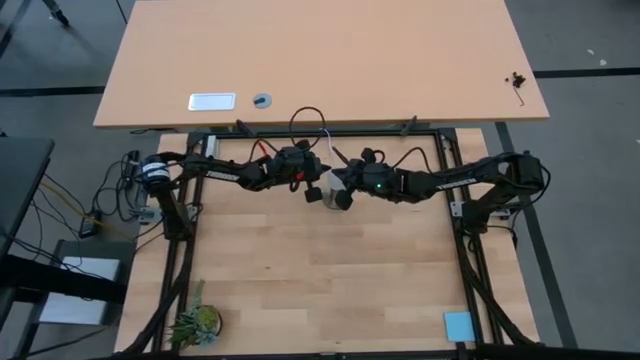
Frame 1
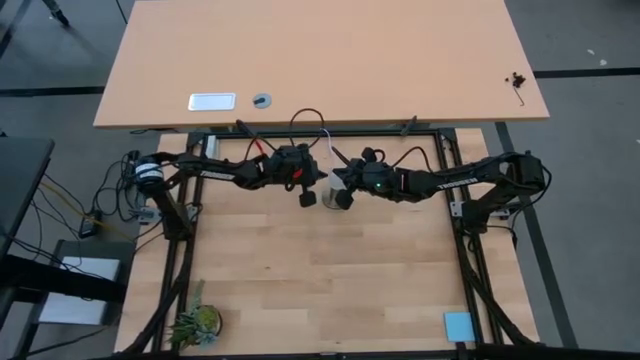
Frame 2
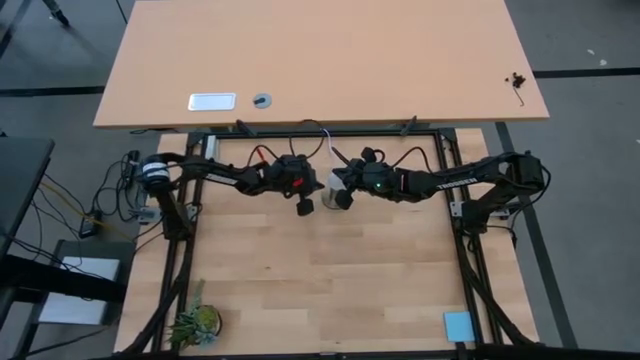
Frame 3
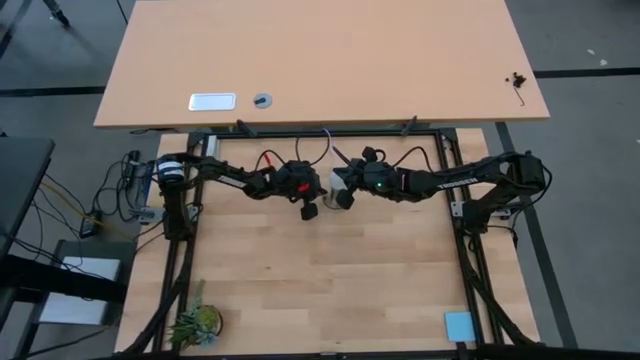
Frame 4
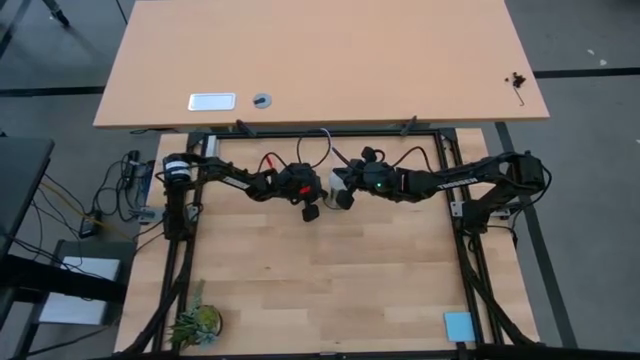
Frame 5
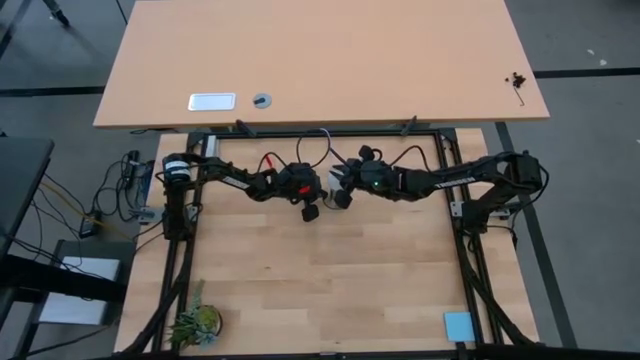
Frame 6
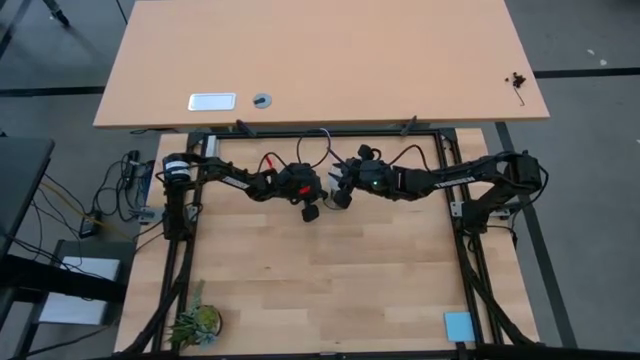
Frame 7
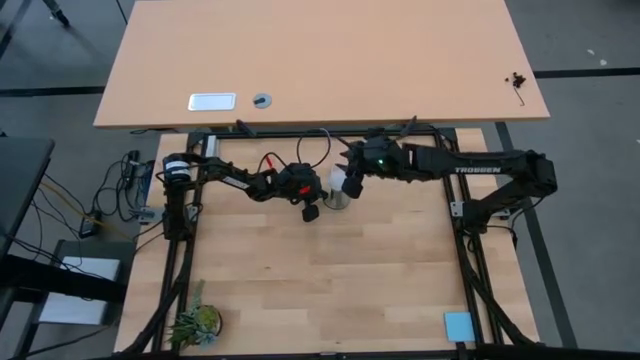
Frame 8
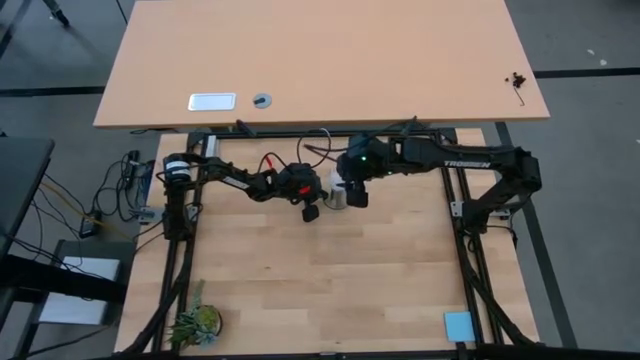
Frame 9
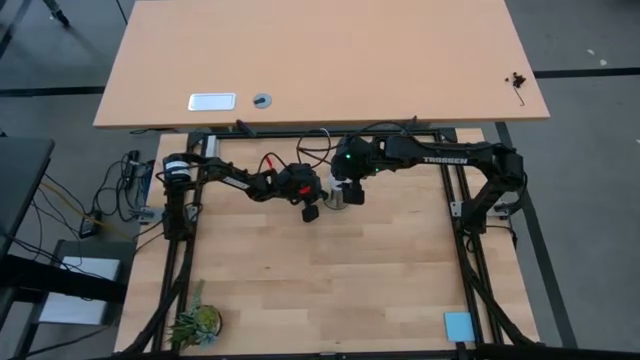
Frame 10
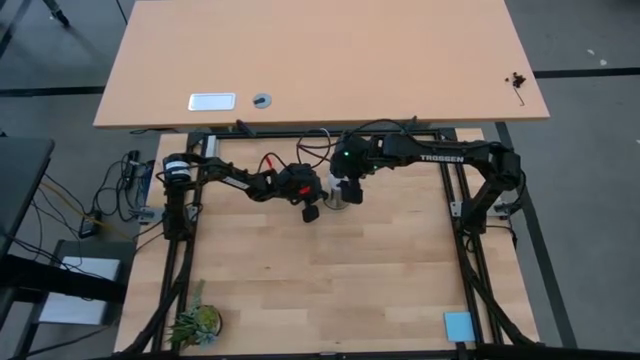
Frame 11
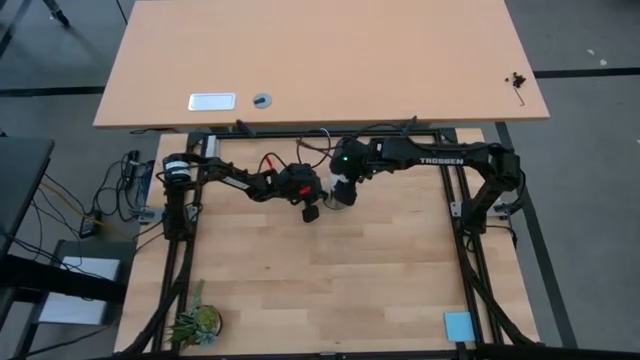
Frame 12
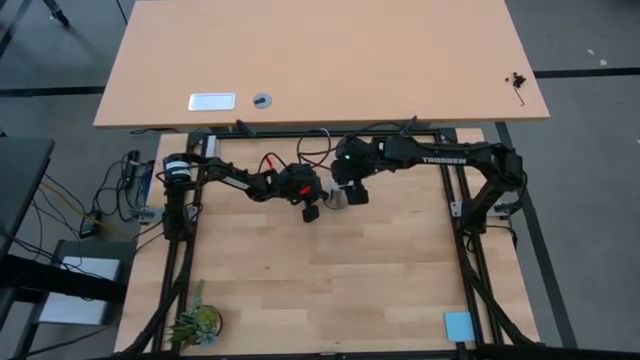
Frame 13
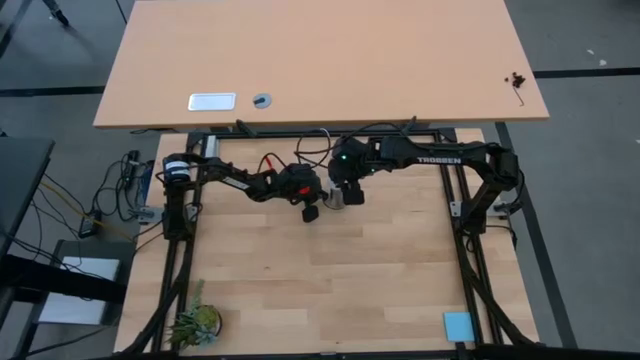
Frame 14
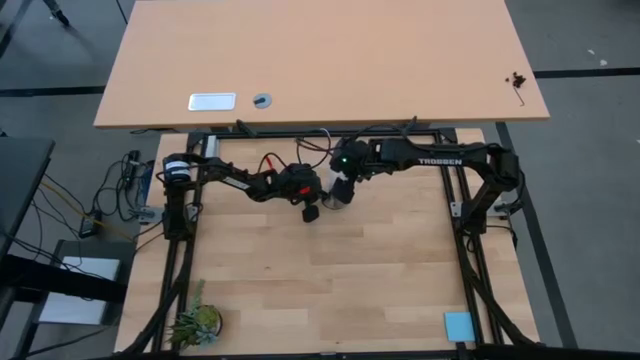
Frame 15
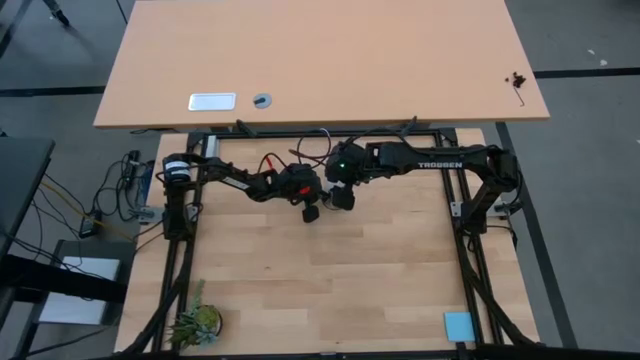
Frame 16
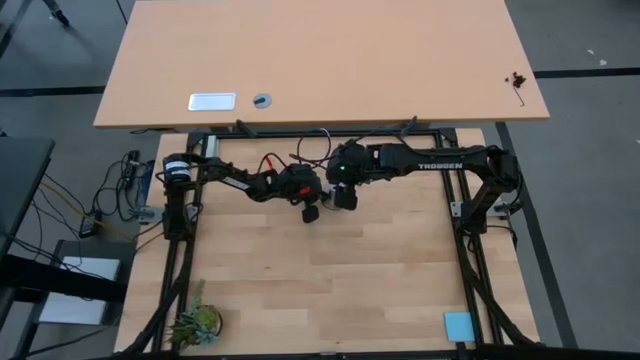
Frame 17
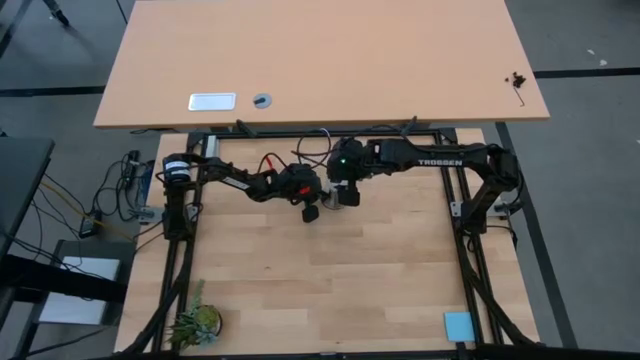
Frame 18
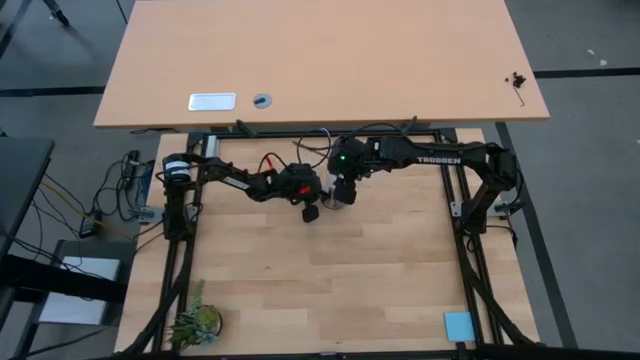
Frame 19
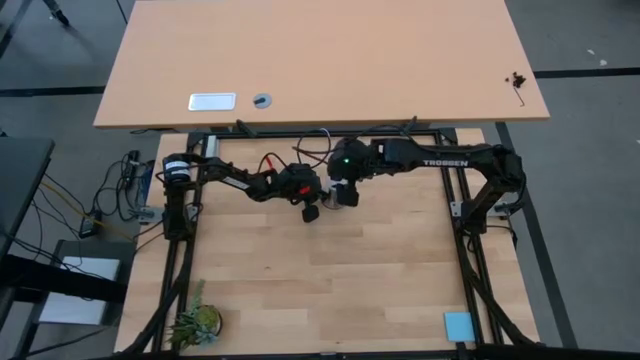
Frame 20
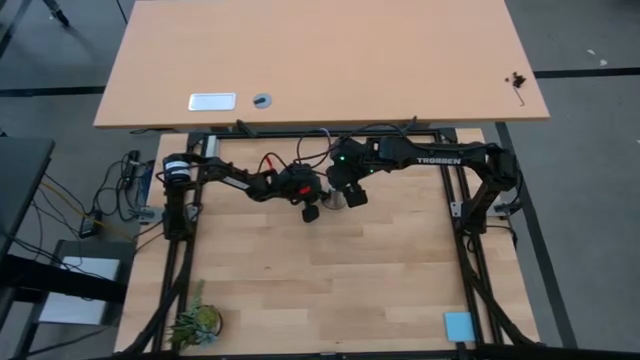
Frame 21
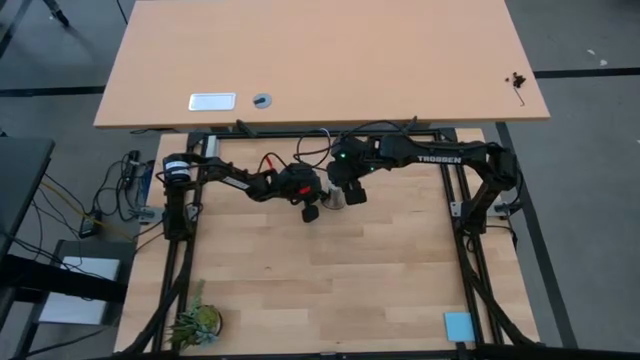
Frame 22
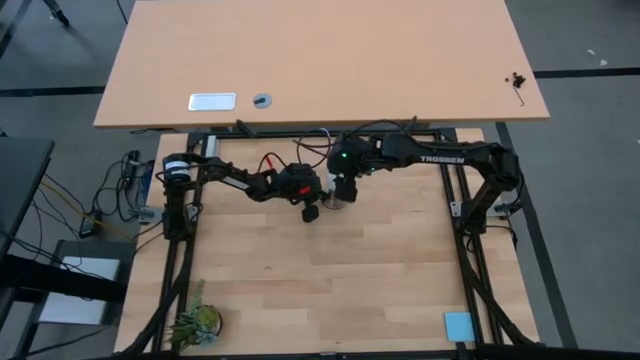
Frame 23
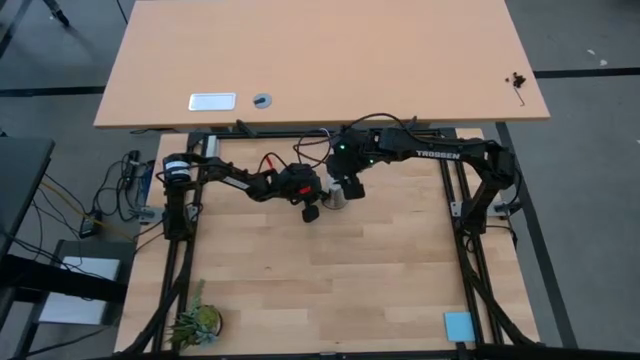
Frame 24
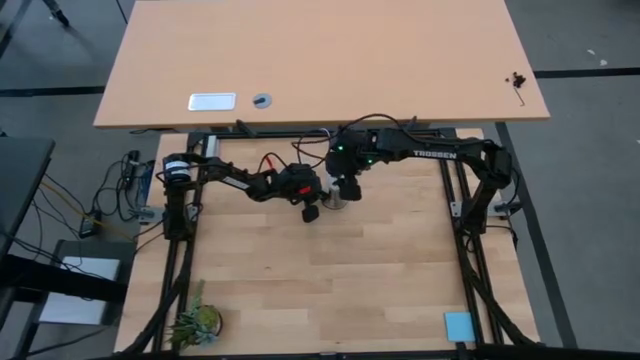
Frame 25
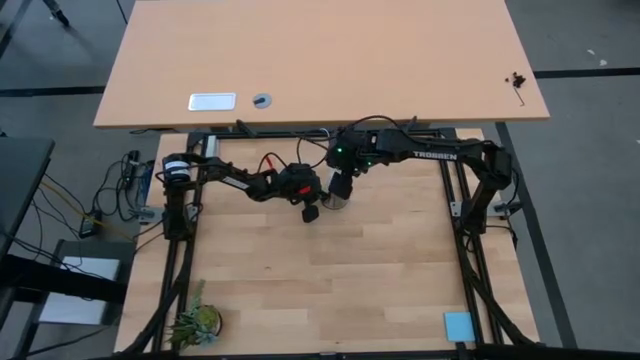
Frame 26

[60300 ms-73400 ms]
Task: Screw lightbulb
Insert the white lightbulb into the gold lamp

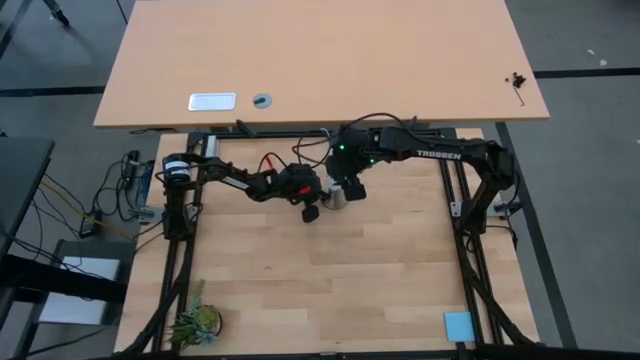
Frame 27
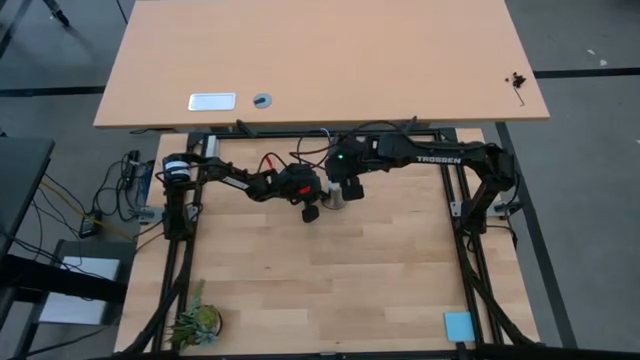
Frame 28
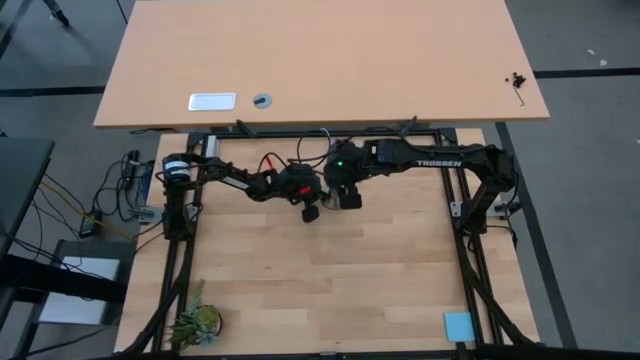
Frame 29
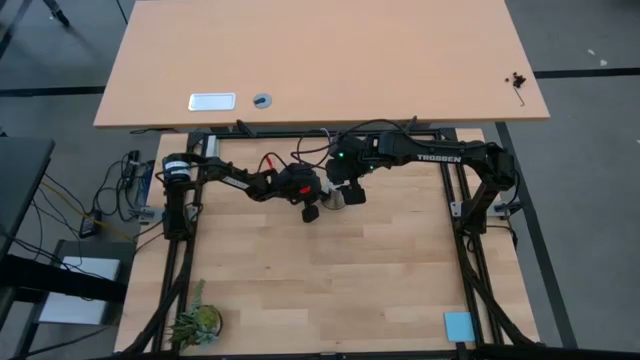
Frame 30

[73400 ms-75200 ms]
Insert the white lightbulb into the gold lamp

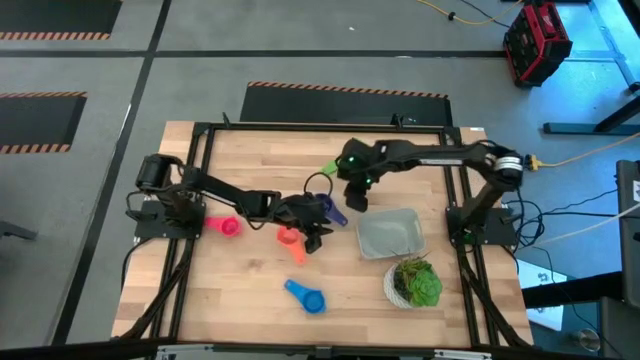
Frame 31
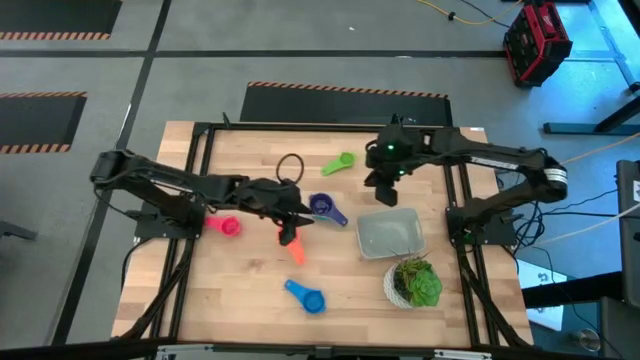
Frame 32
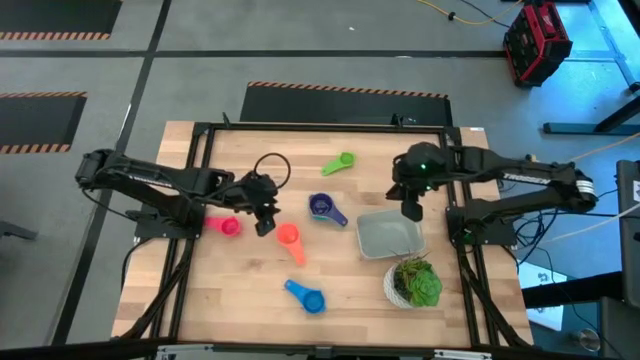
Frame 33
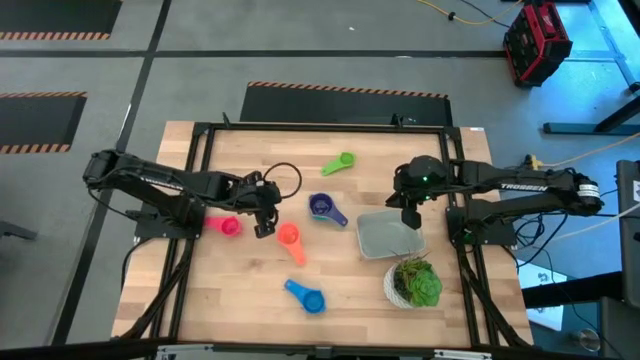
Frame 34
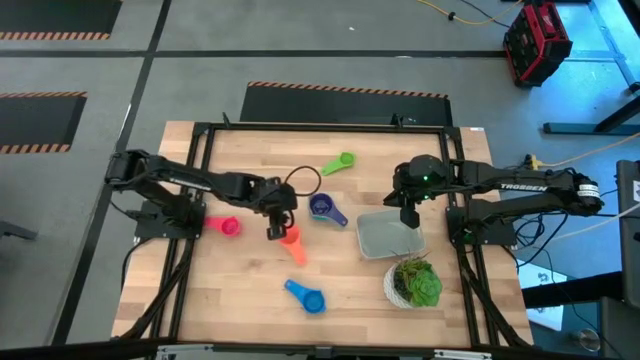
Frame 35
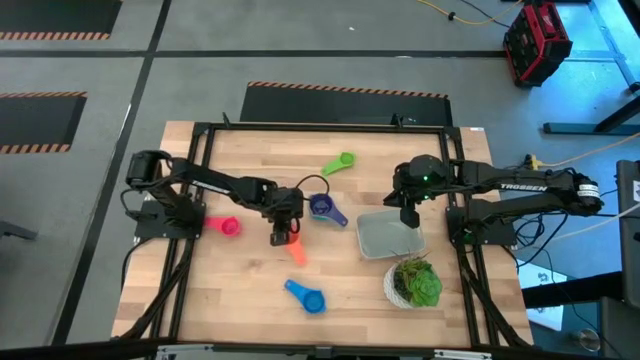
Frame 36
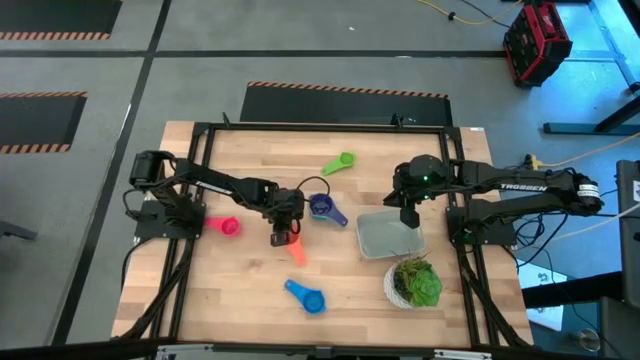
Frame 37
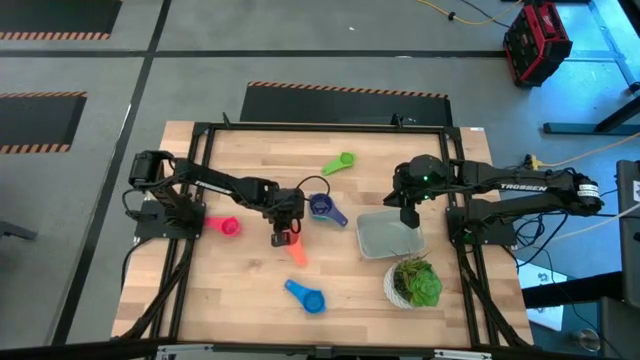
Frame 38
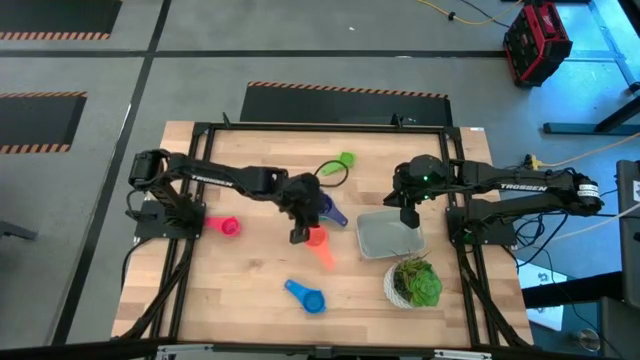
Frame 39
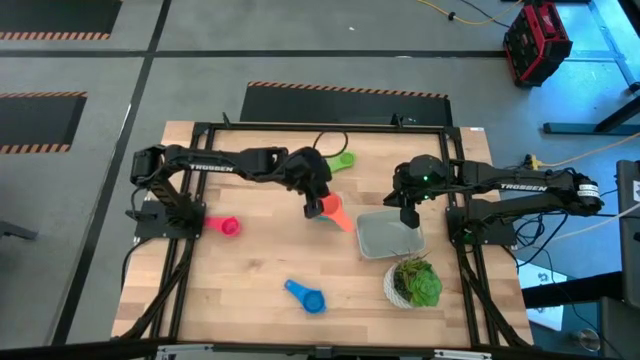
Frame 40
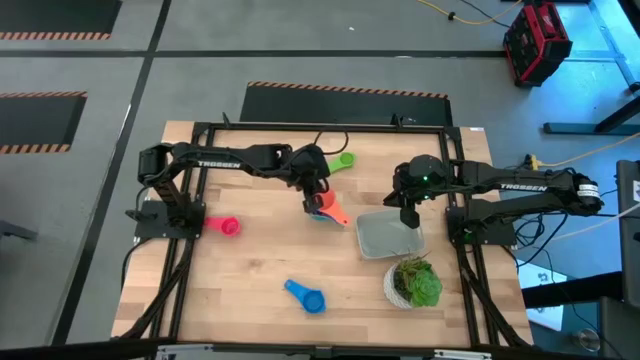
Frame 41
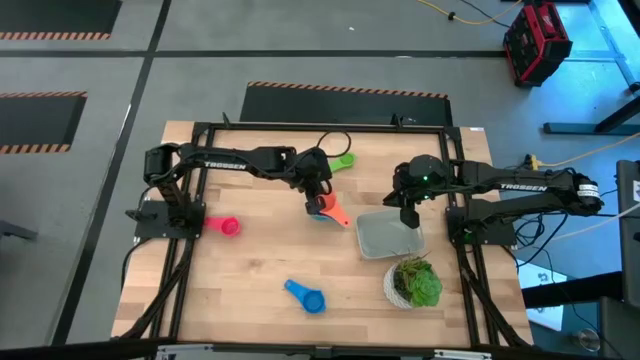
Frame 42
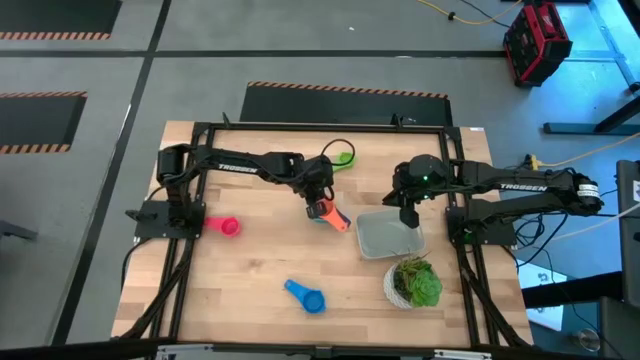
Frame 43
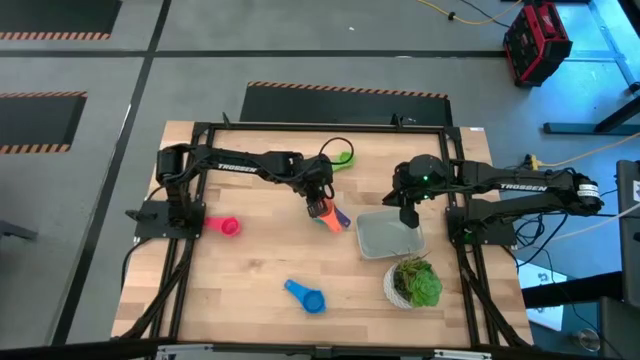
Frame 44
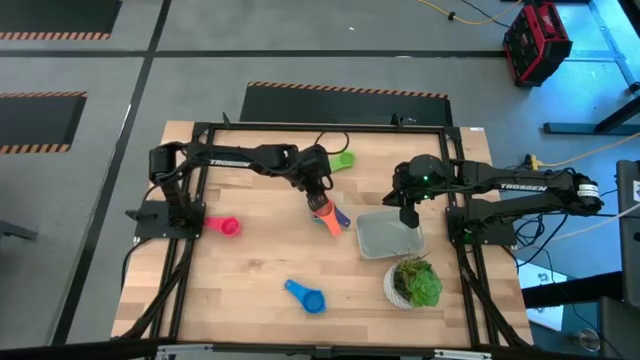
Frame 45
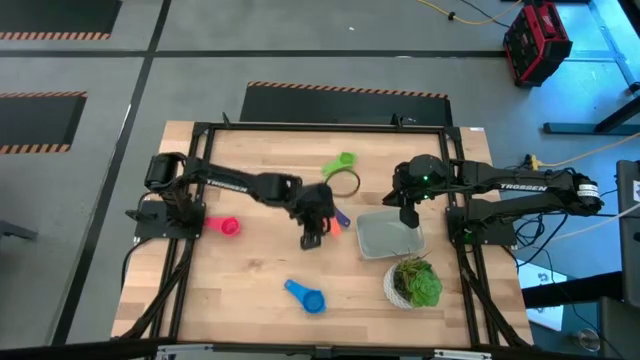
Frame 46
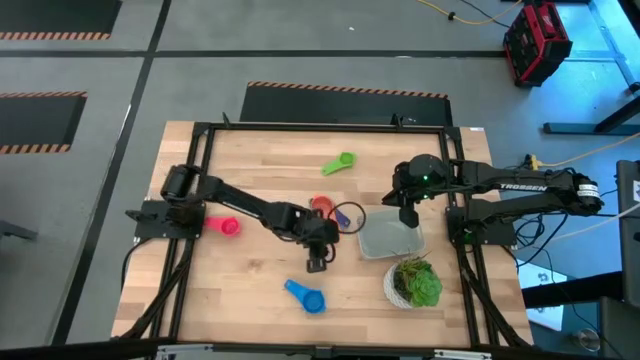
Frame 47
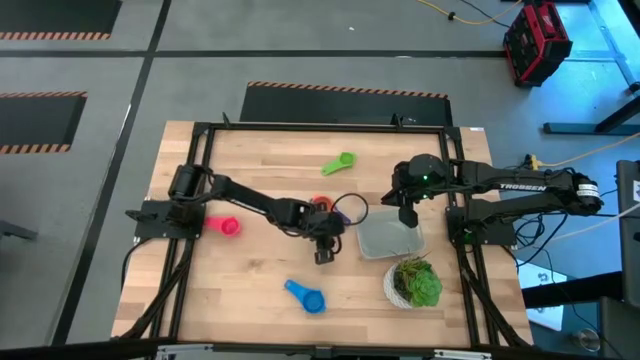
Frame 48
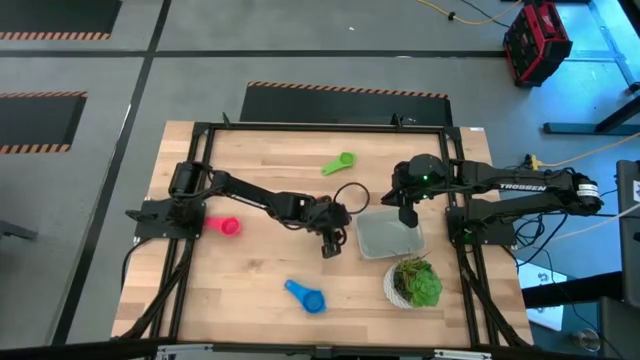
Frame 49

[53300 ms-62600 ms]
Task: Nest measuring cups in basket
Stack the orange measuring cup on top of the violet measuring cup
